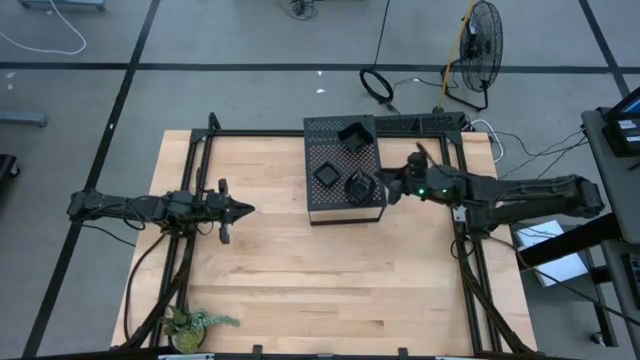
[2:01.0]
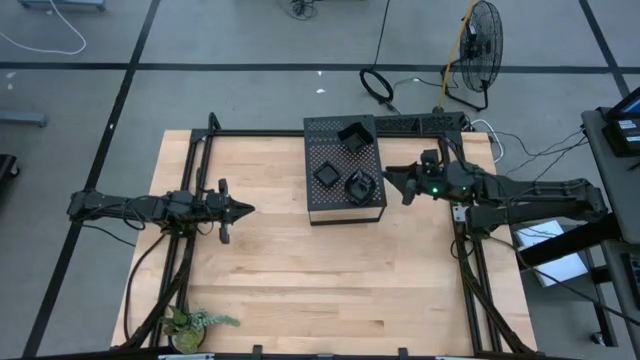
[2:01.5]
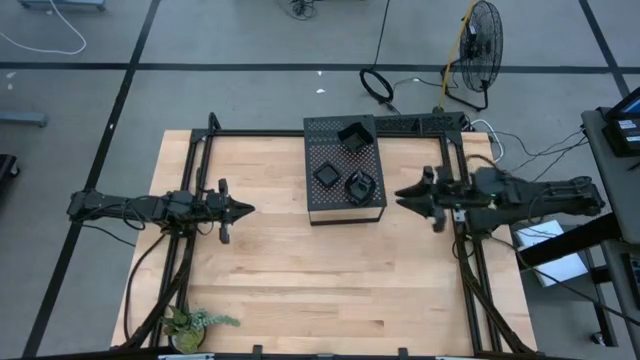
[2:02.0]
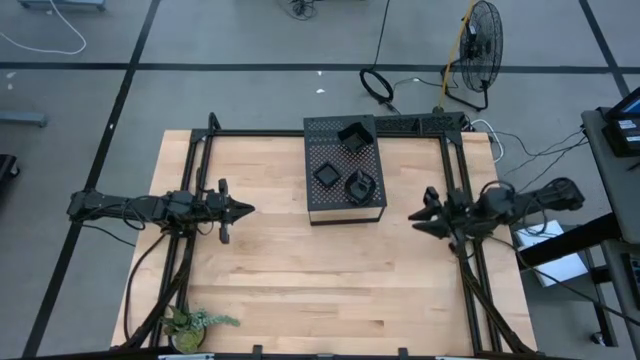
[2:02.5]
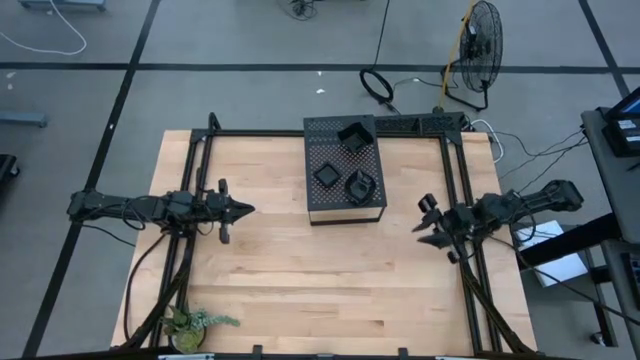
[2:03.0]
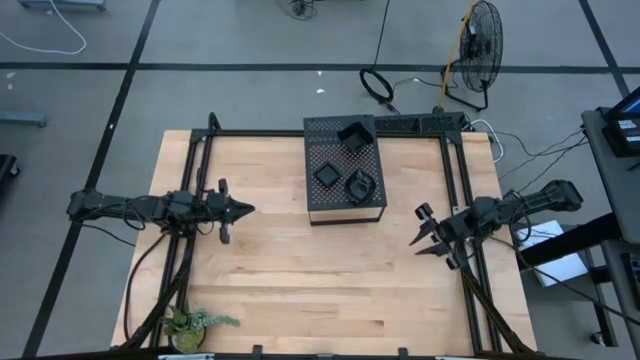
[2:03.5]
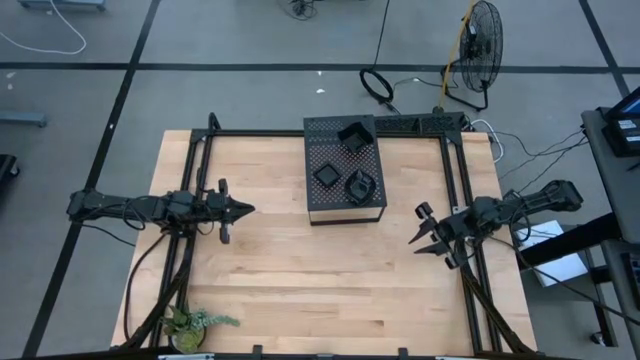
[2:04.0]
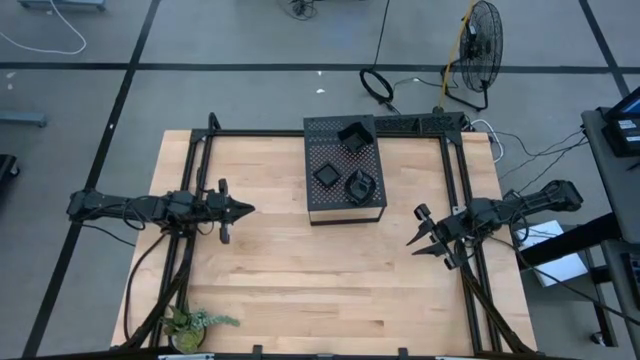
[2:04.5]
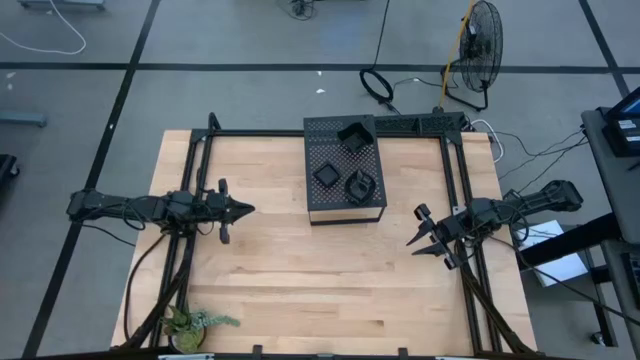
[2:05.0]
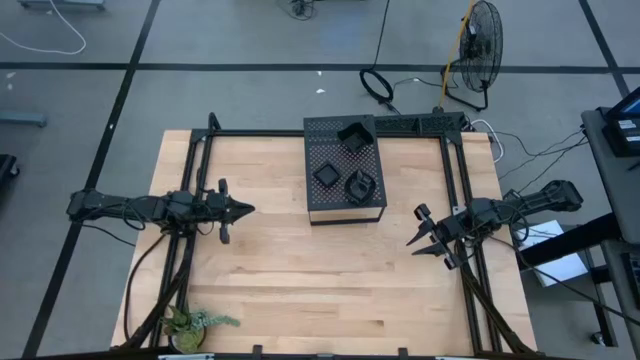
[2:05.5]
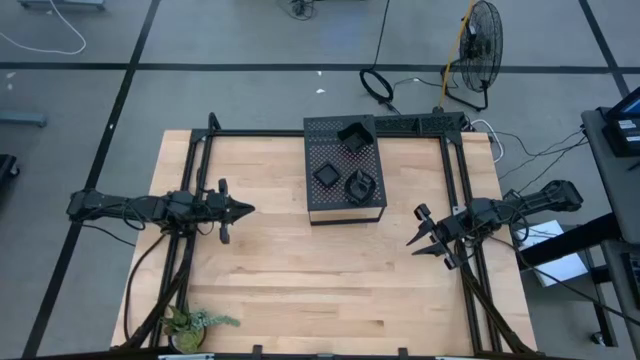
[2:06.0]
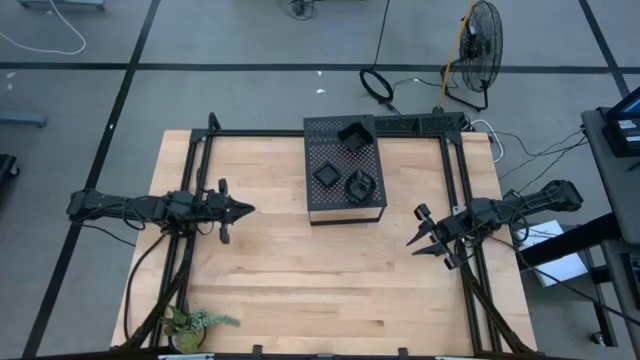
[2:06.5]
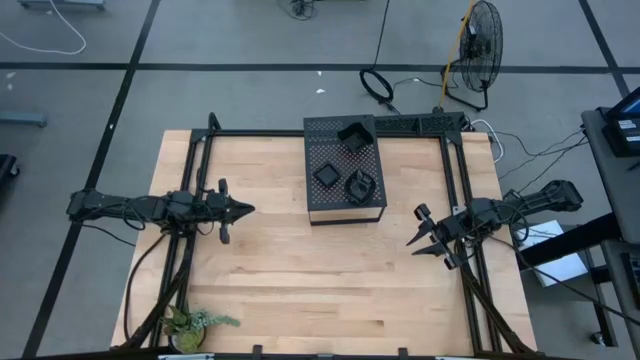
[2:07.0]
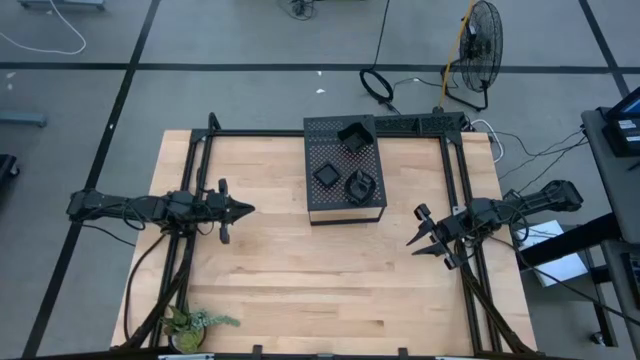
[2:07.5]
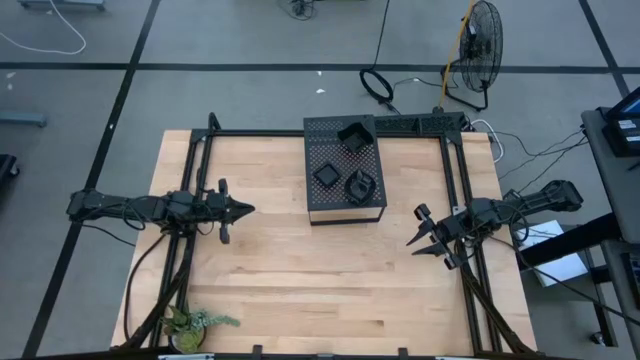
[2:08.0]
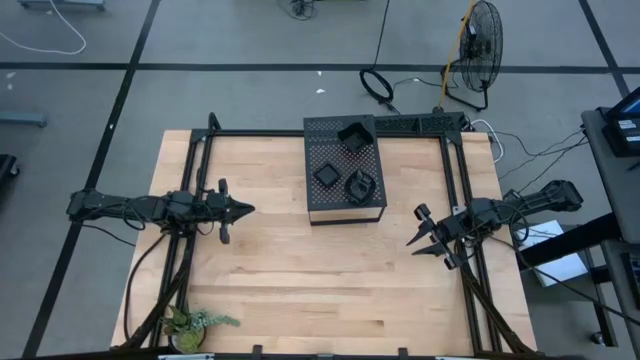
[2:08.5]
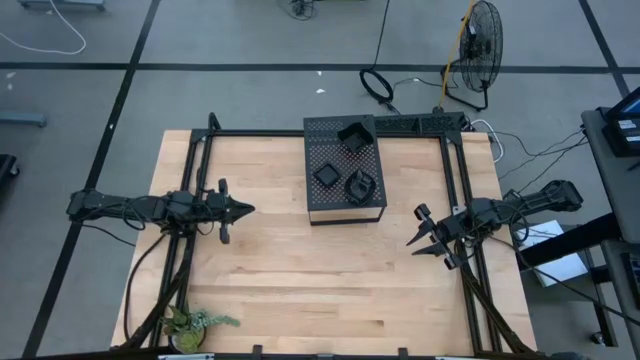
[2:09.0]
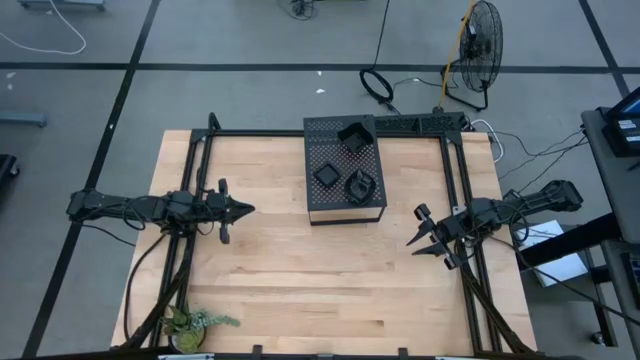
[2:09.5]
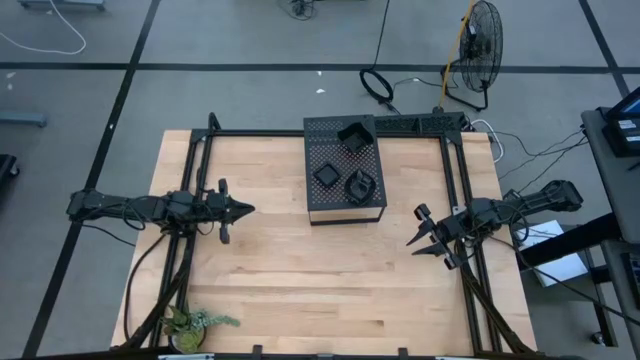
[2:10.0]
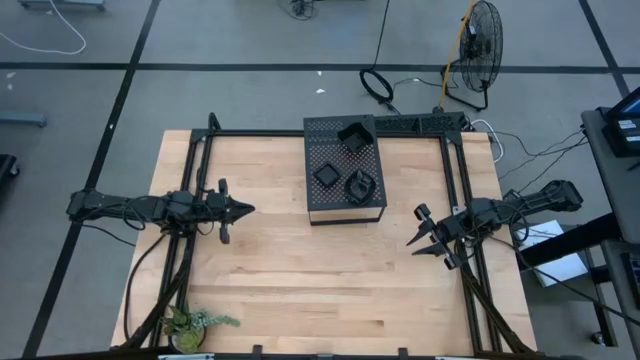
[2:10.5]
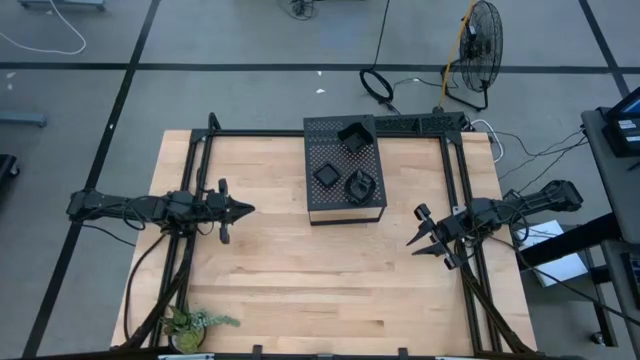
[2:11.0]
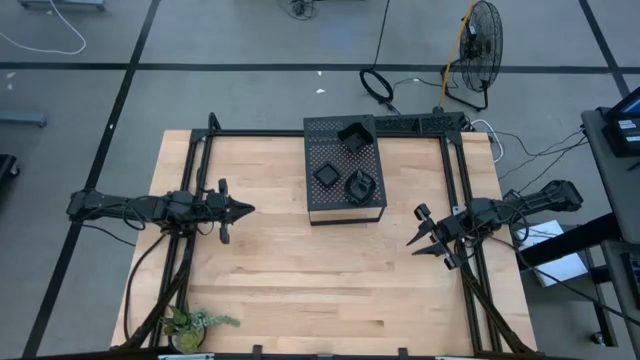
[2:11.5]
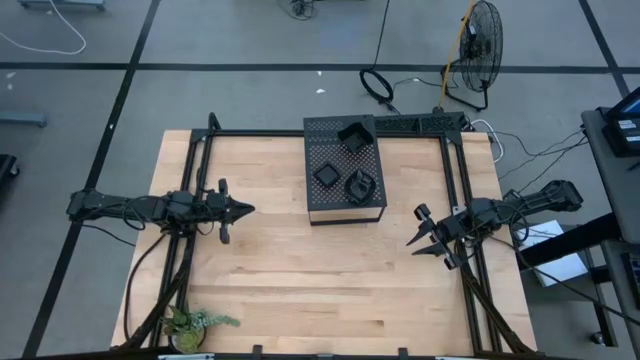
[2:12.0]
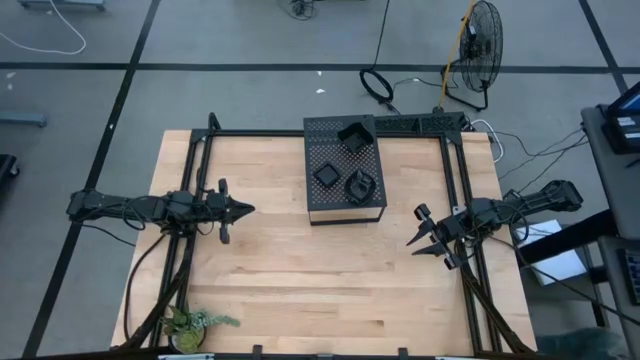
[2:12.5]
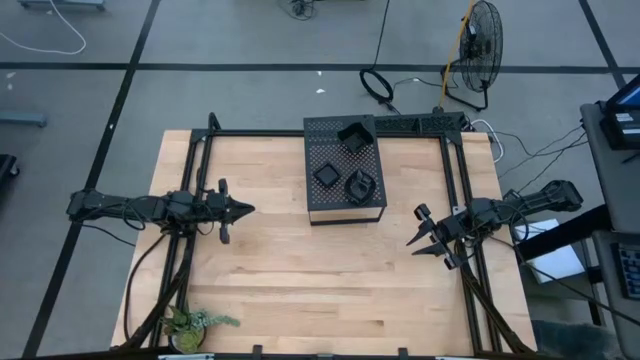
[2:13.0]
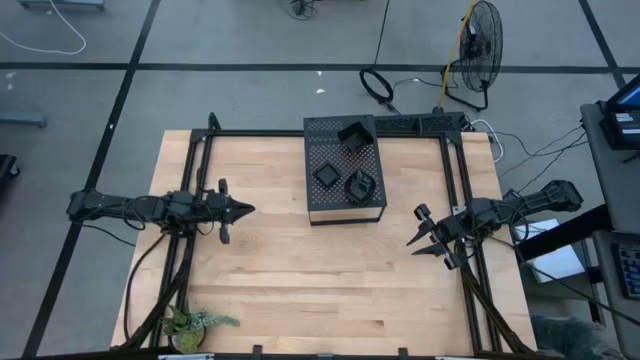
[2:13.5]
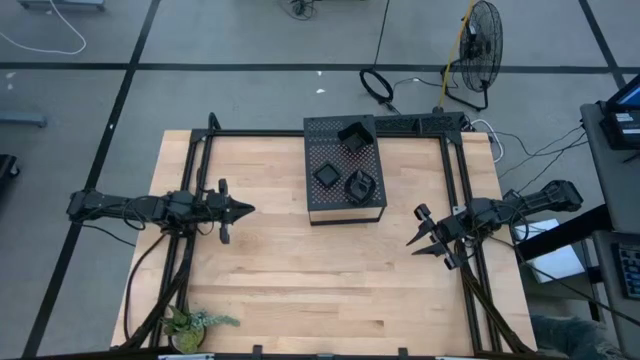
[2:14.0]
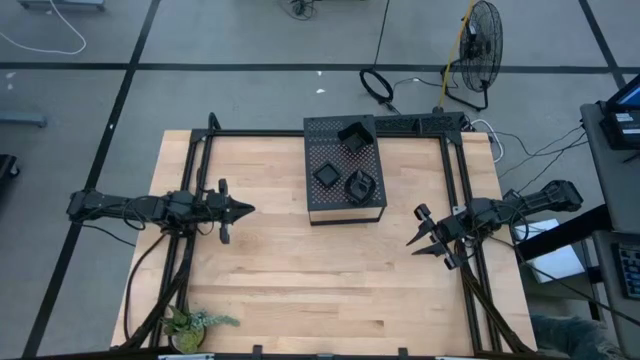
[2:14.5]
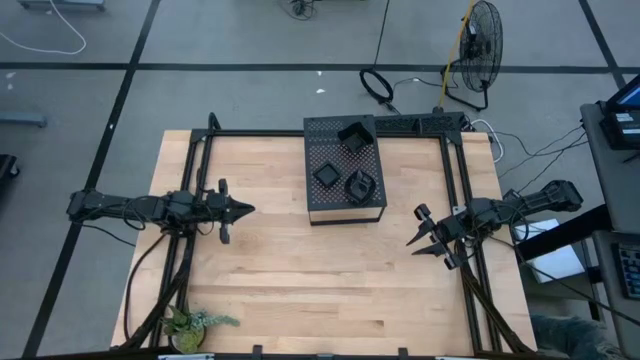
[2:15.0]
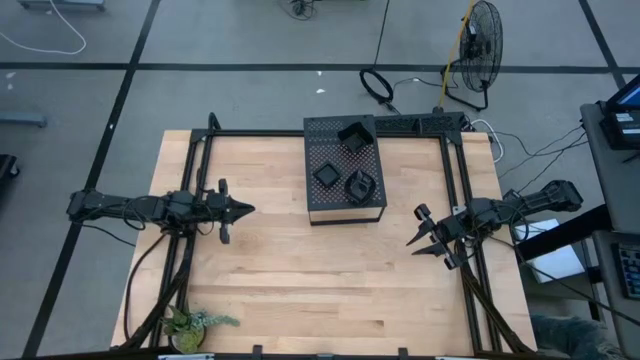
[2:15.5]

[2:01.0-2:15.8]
Task: Pick & Place Mini shaped plates
Return to Home Position

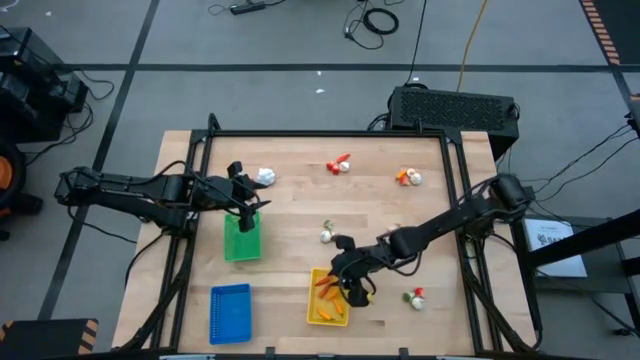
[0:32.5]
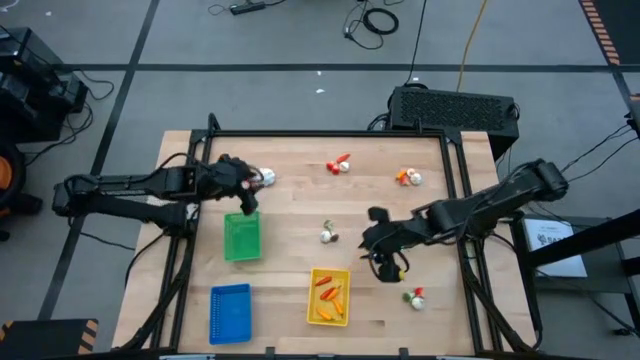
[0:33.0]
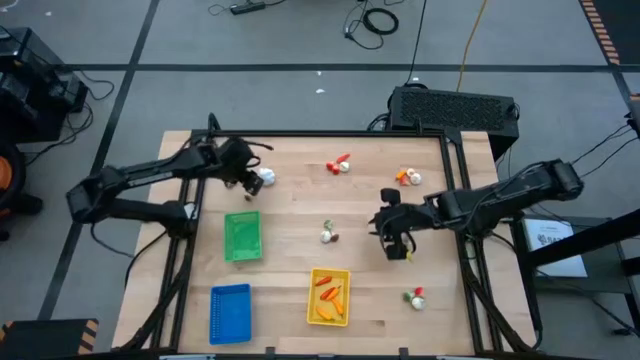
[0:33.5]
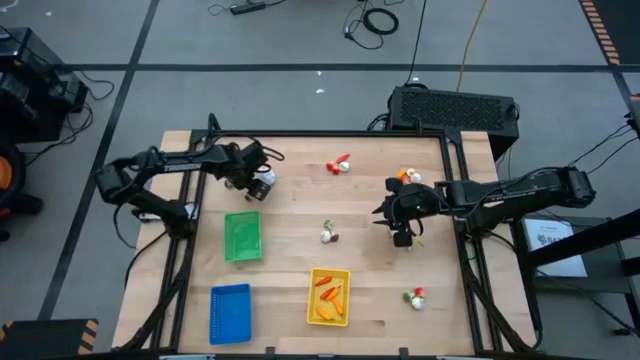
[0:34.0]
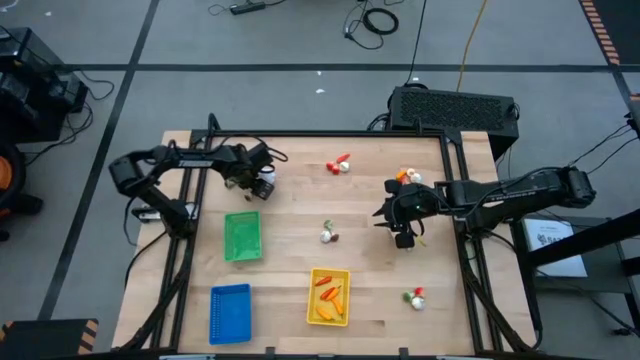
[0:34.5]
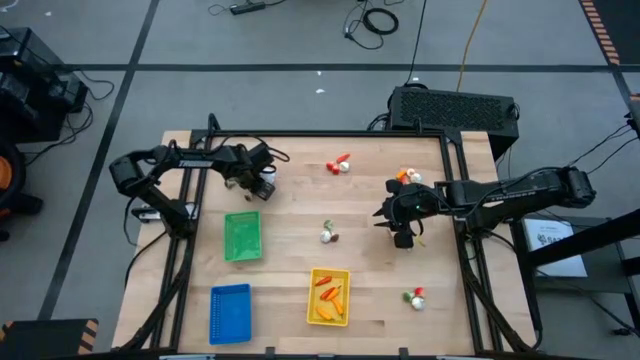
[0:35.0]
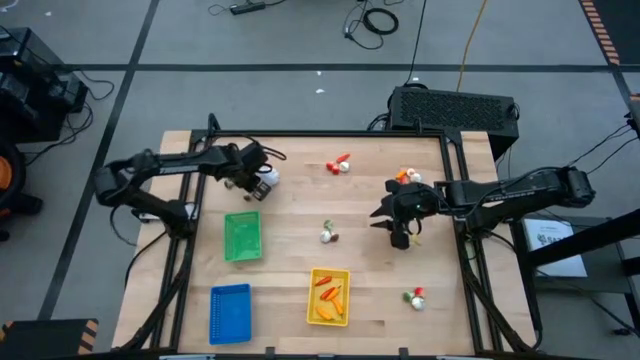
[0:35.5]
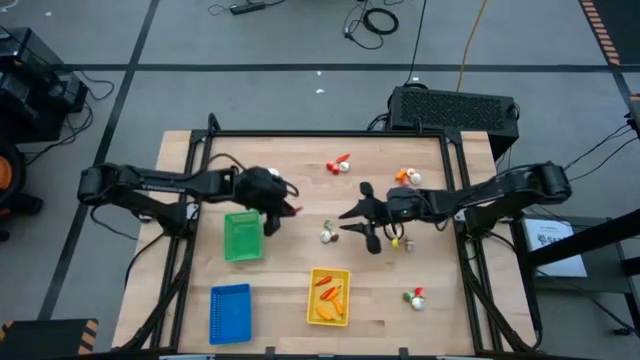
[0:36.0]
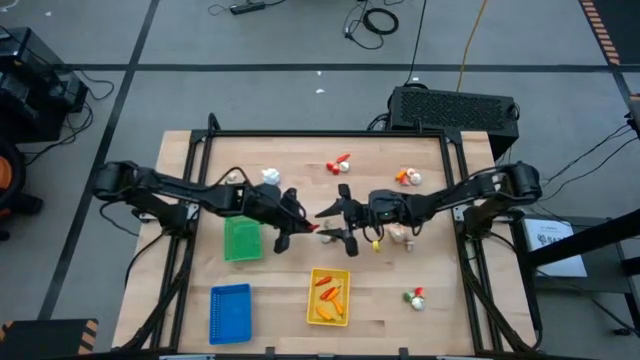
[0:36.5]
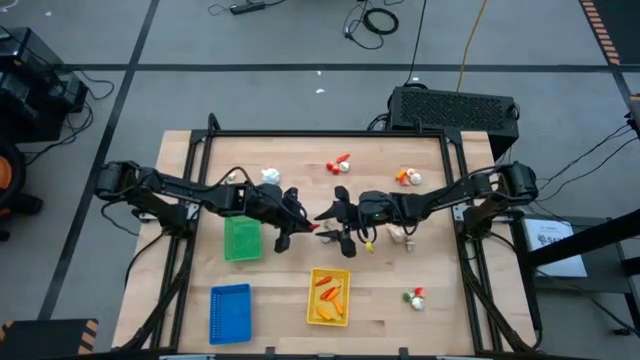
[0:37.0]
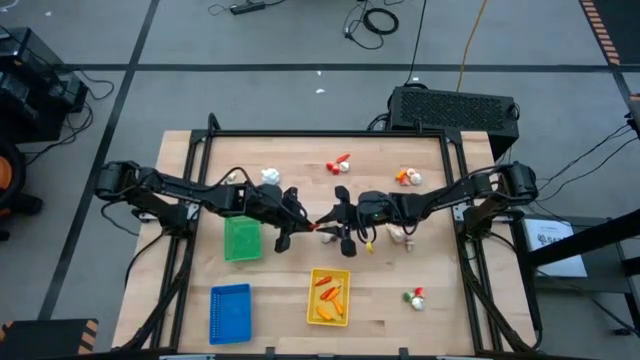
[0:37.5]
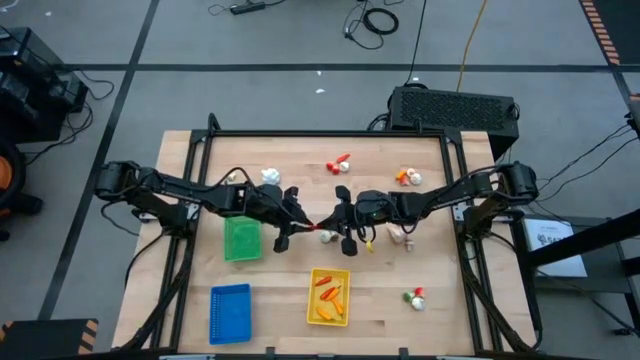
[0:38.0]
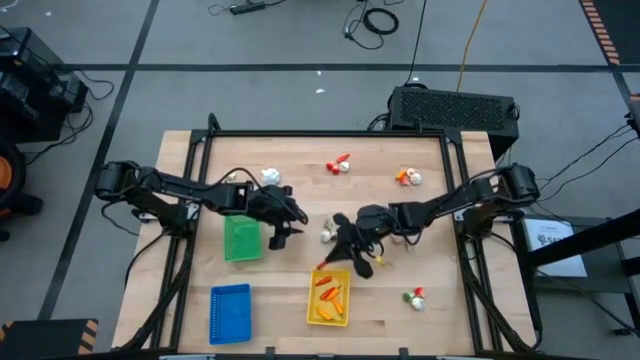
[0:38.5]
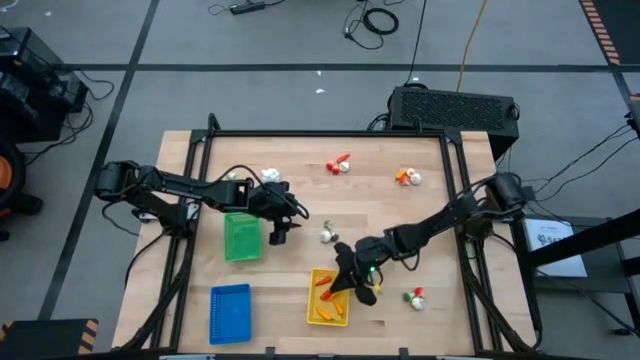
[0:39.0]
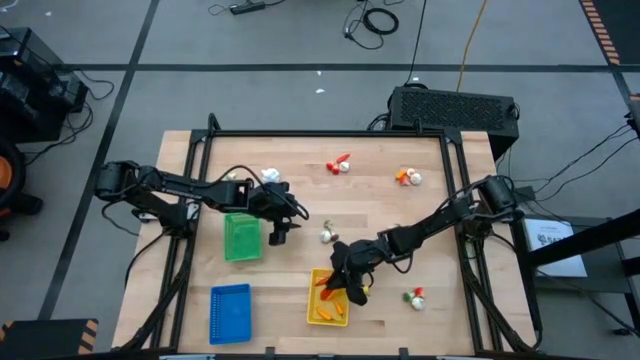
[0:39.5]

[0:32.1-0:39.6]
Task: Sort produce into baskets
Put the red chili pepper into the yellow basket
